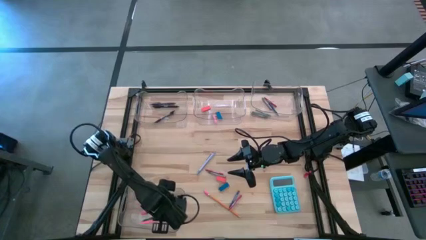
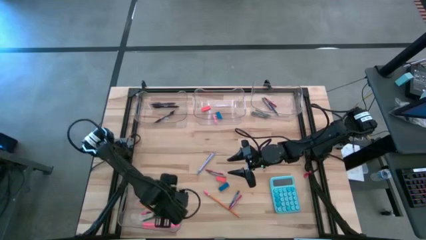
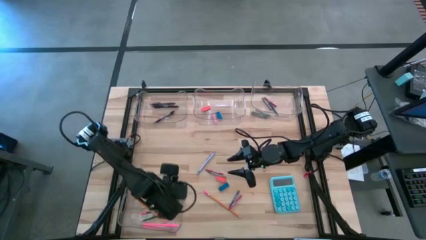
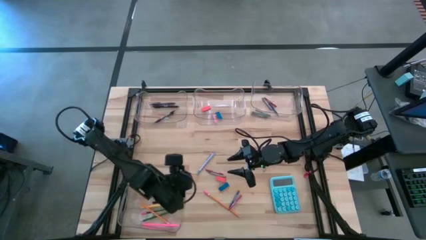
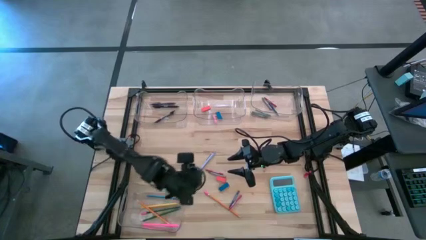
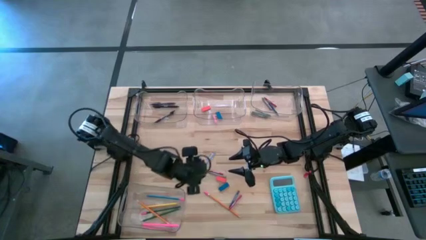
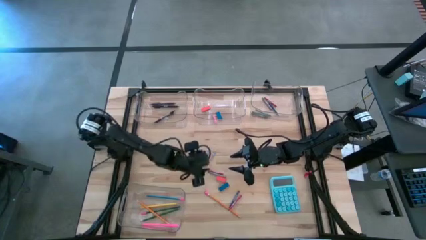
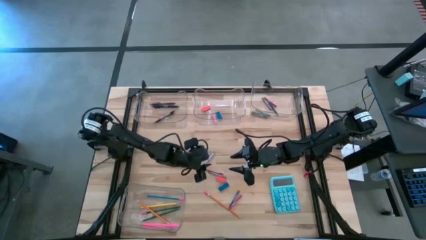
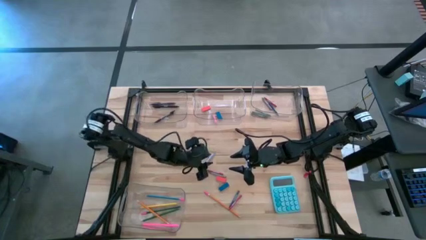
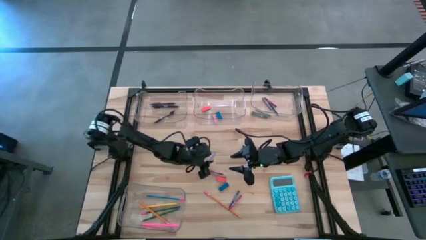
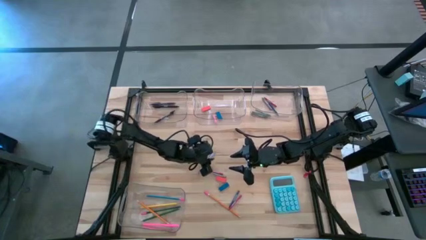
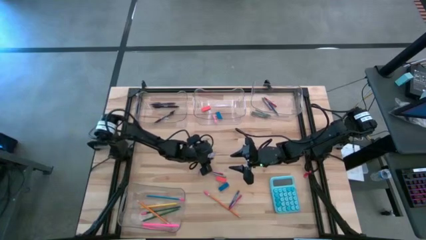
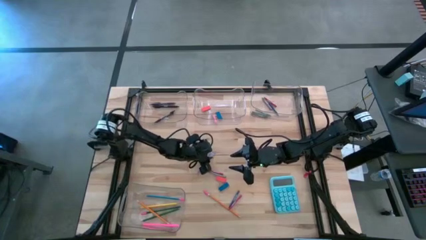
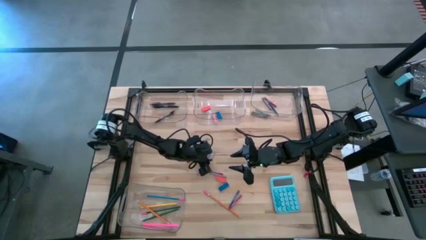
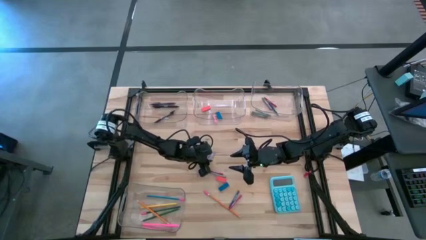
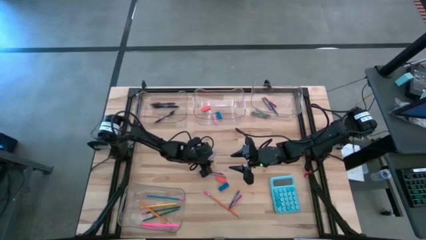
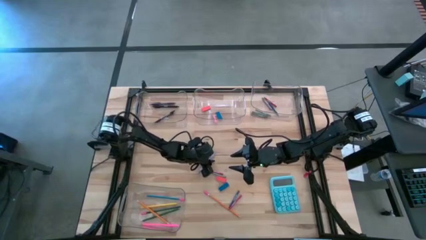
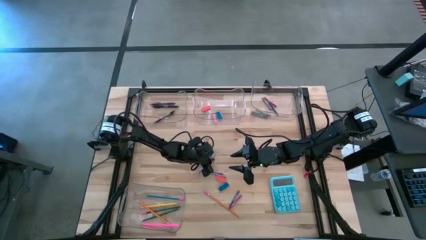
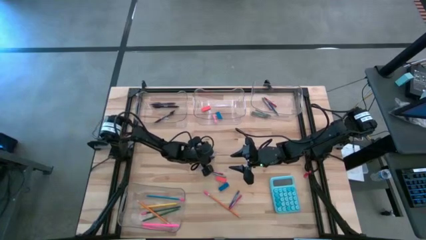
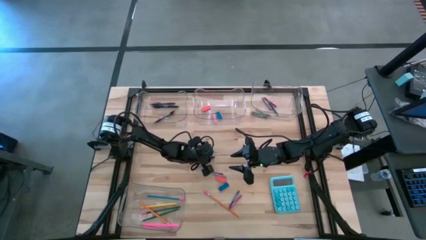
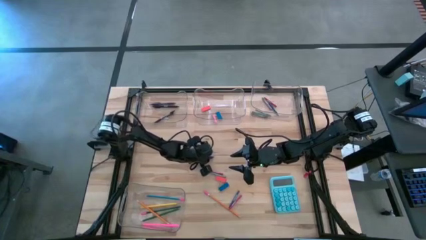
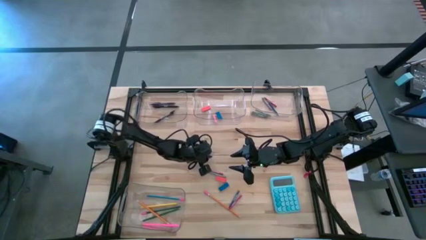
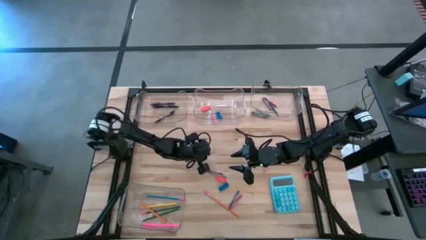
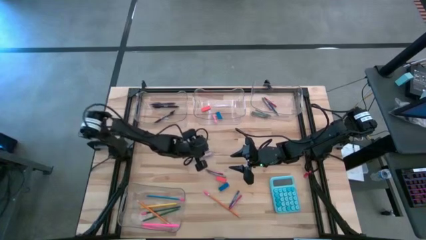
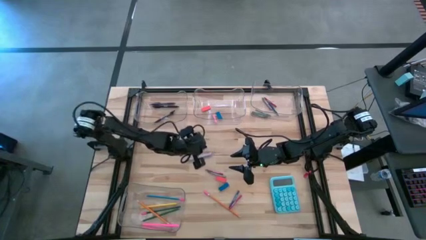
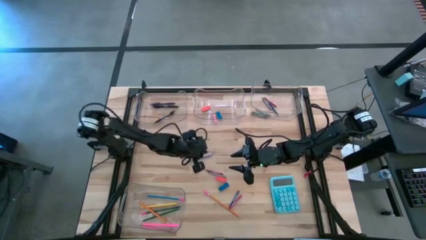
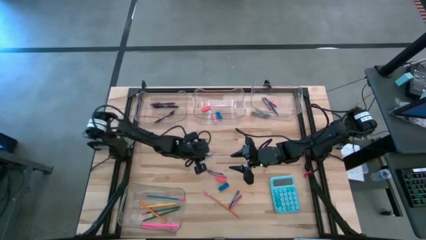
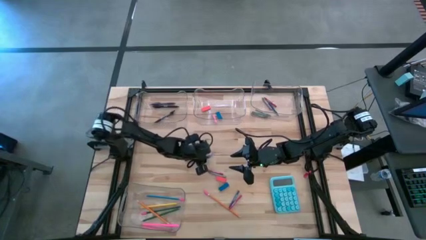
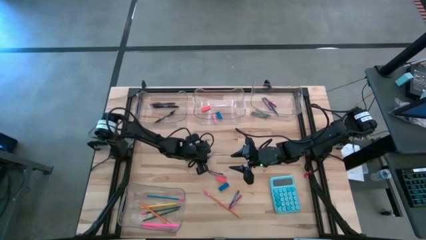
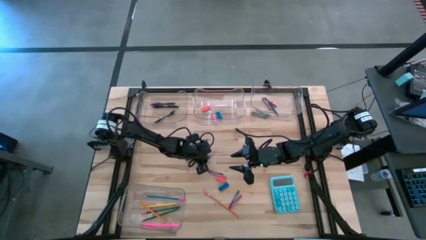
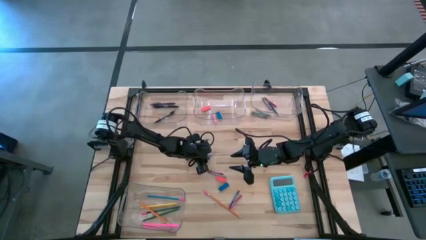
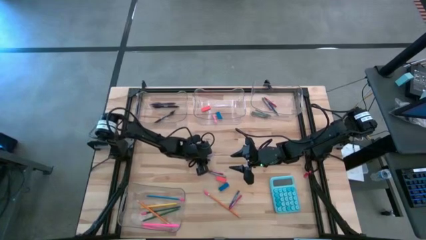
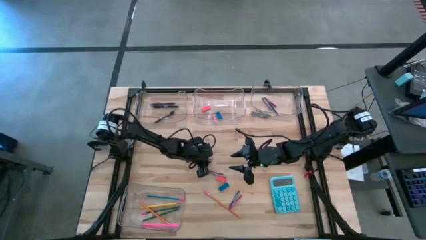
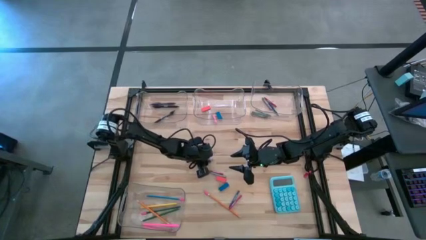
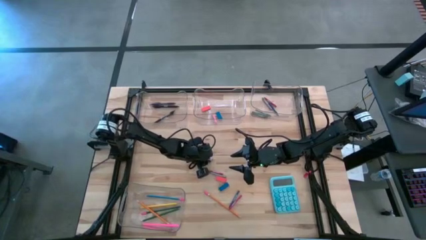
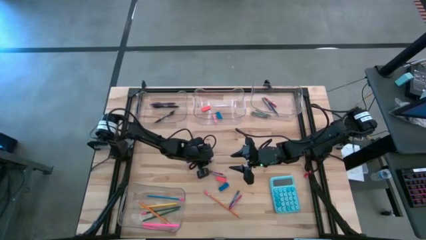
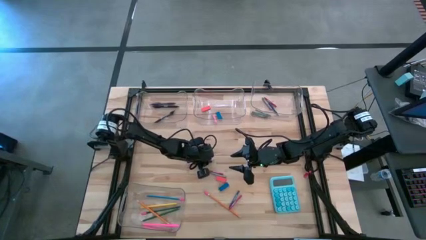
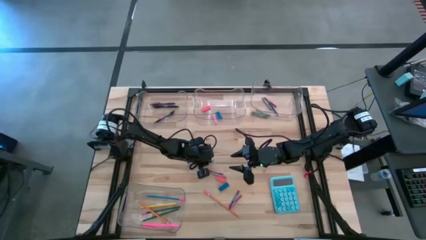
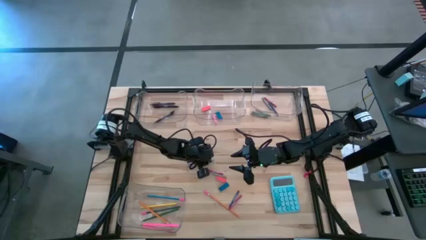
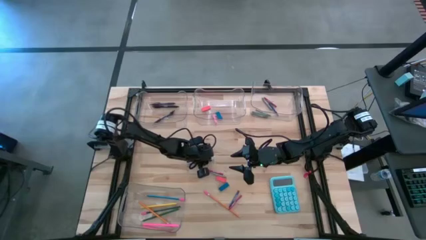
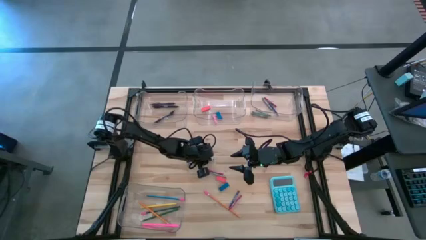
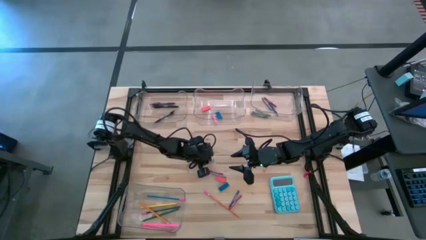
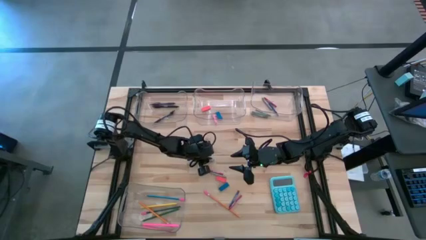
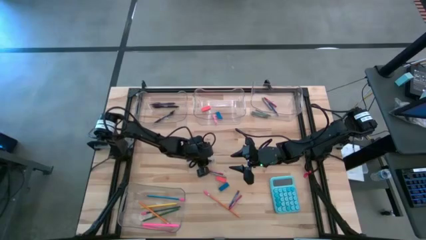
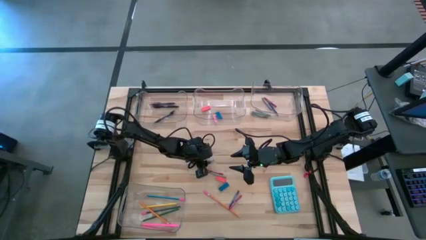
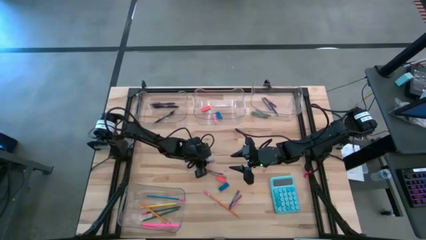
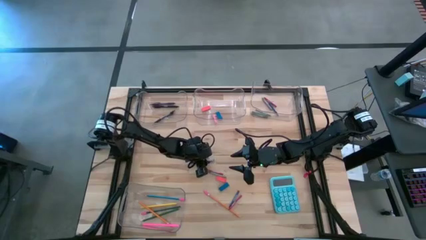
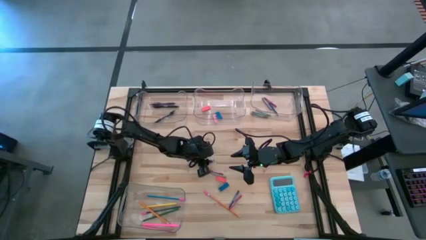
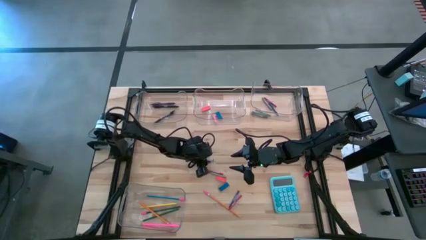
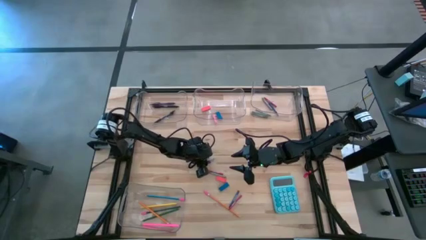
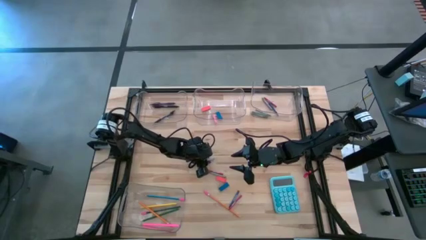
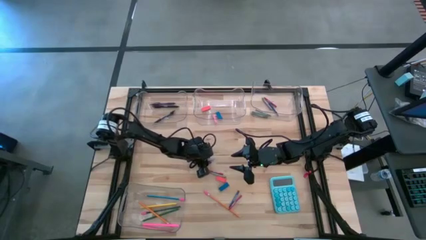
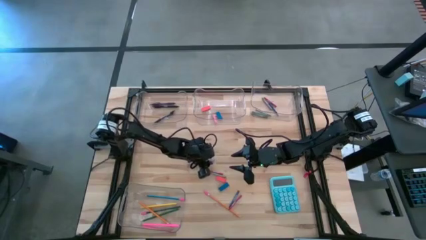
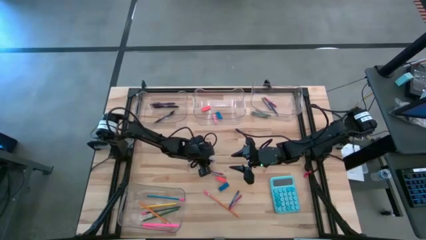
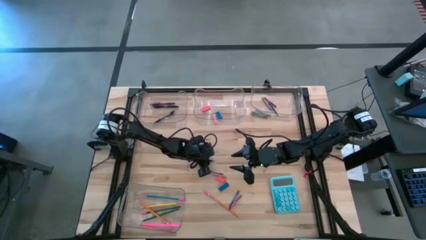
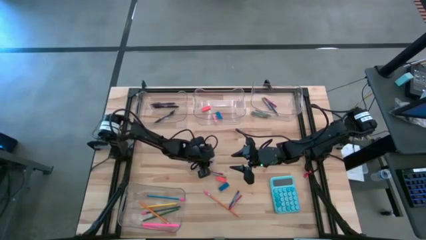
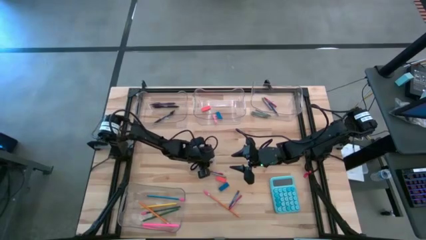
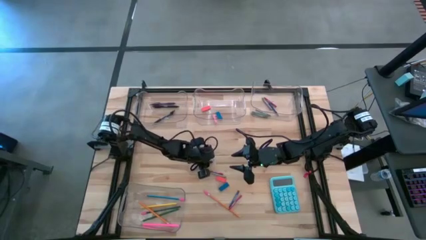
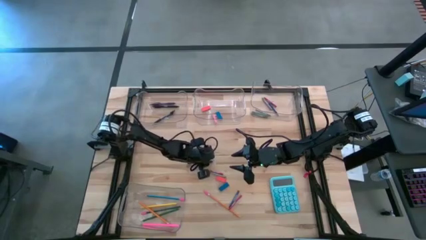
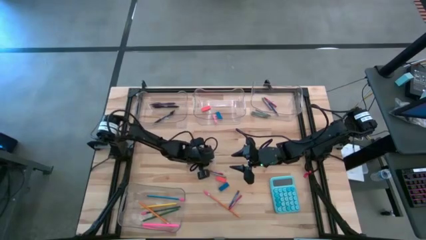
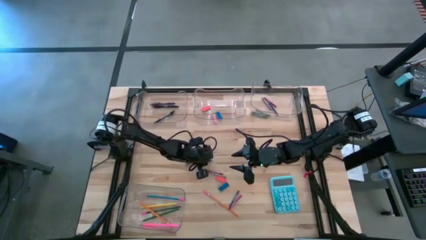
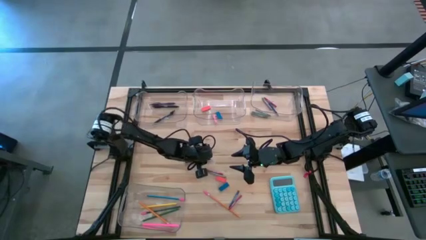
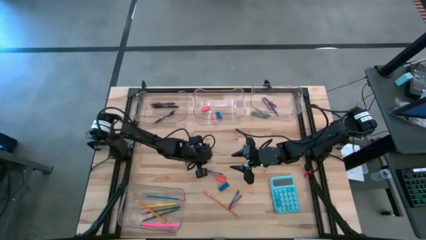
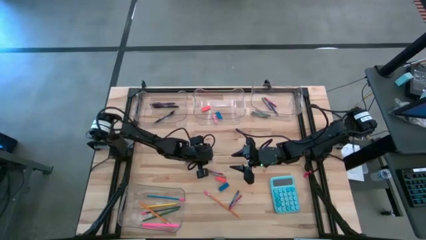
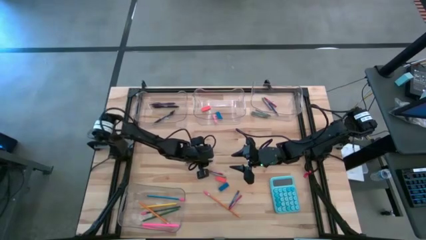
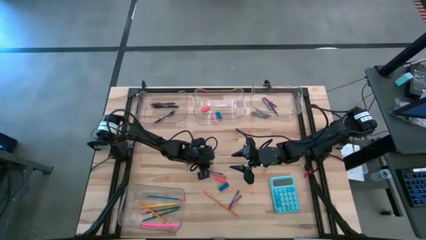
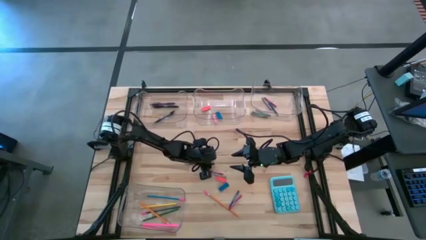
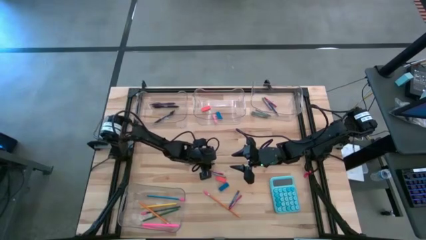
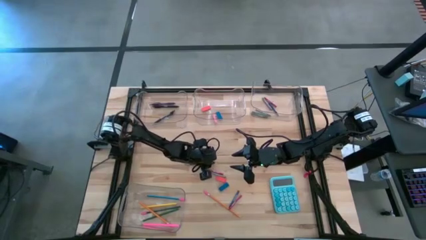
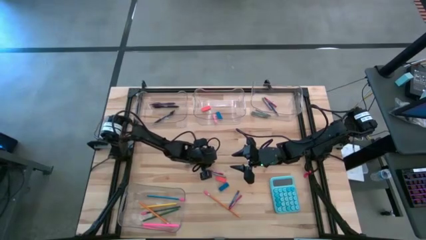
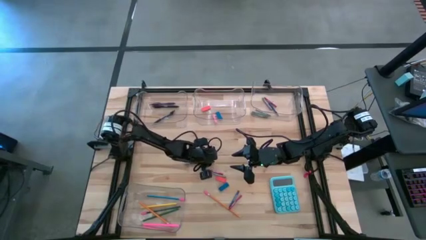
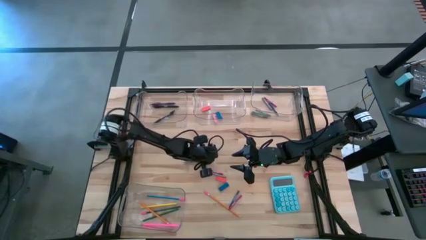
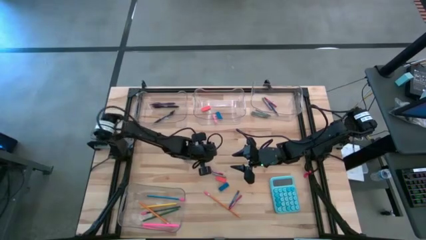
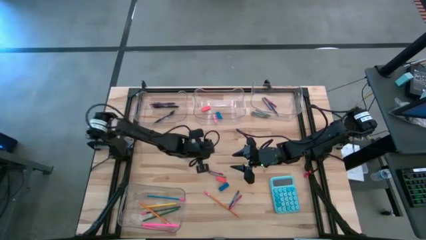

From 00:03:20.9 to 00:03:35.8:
Task: Sort crayons/erasers/pens/pencils in bins
Put the light blue ballpen into the top left transparent bin

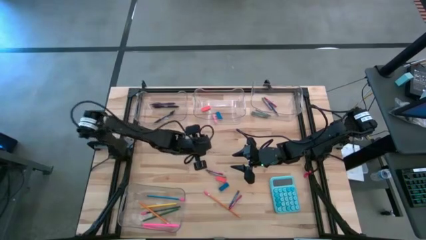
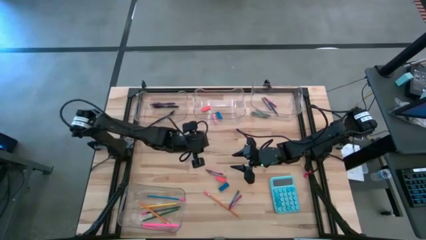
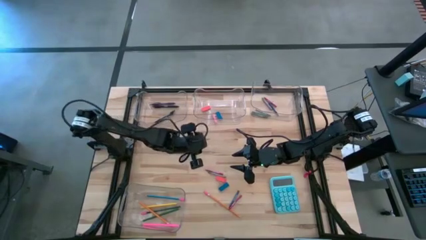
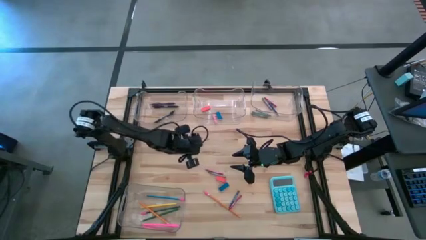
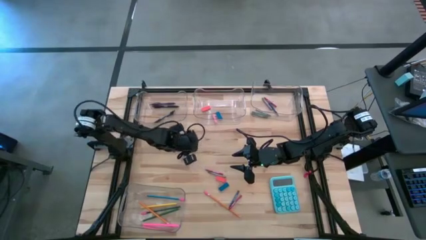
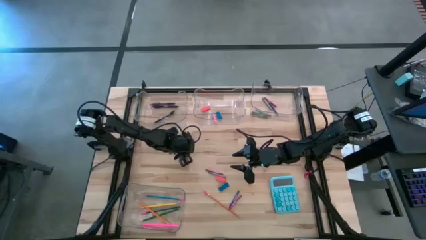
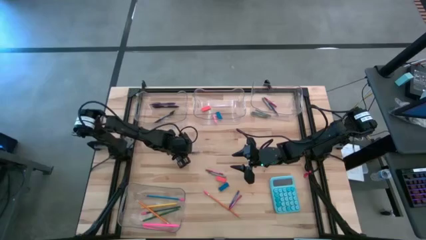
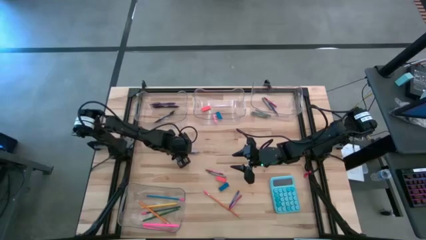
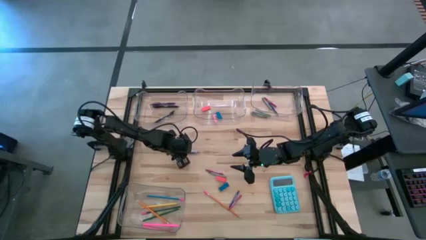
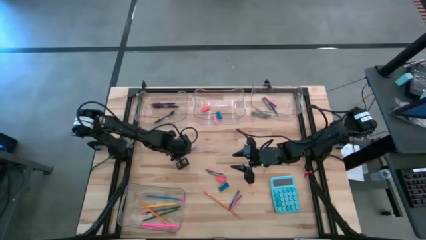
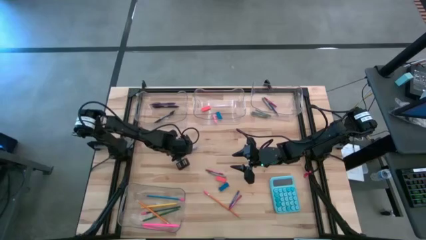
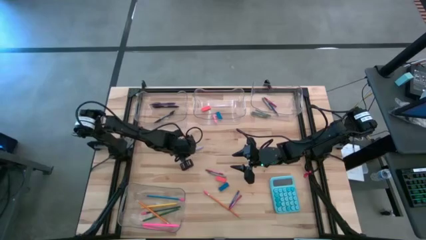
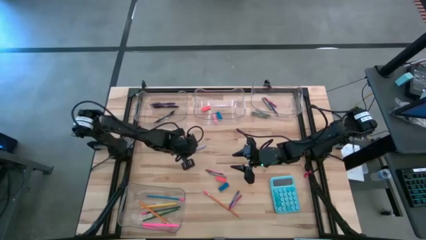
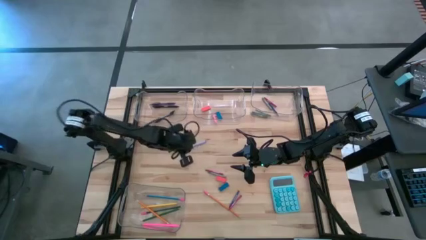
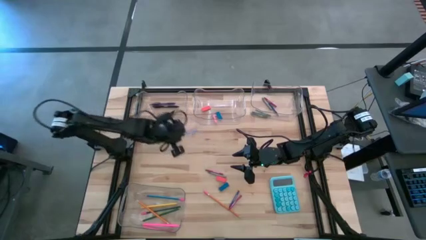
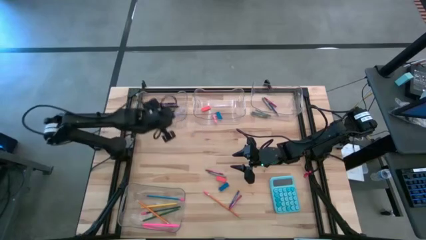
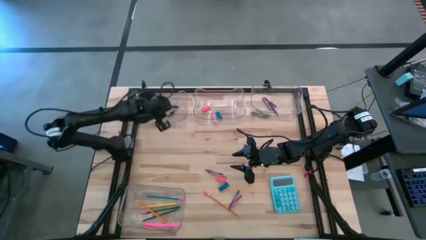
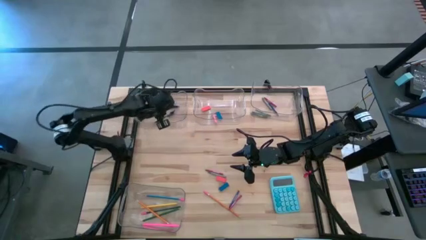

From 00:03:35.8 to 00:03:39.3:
Put the light blue ballpen into the top left transparent bin
